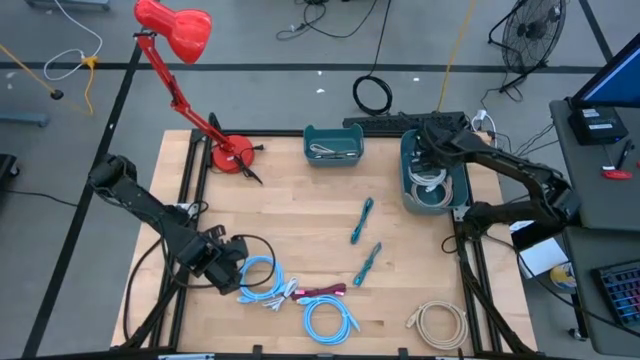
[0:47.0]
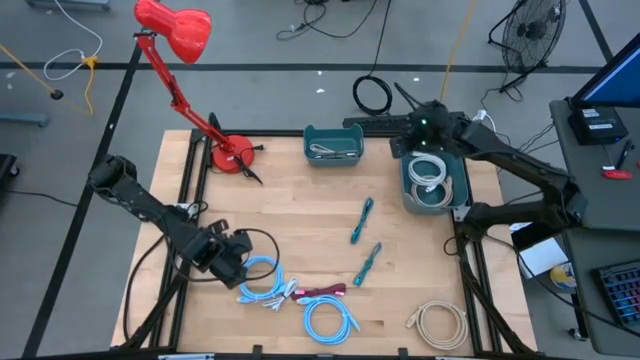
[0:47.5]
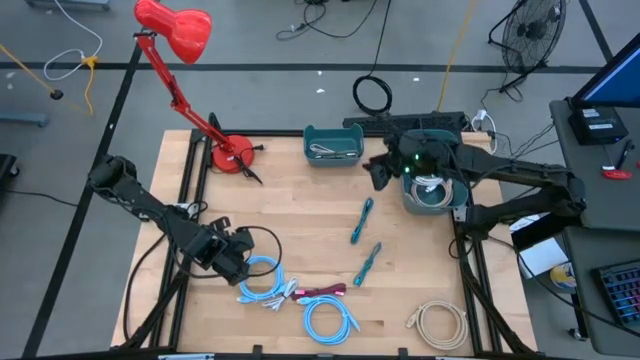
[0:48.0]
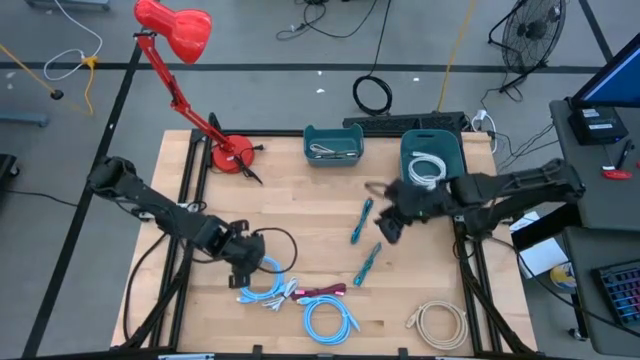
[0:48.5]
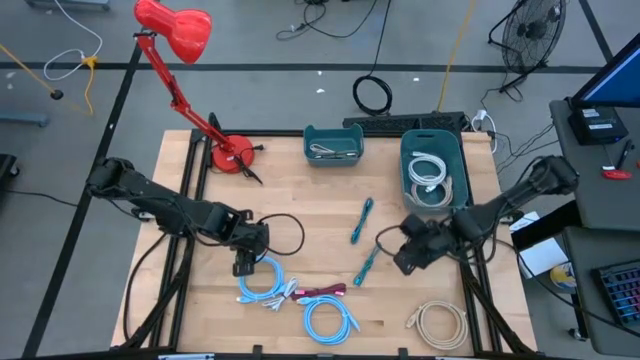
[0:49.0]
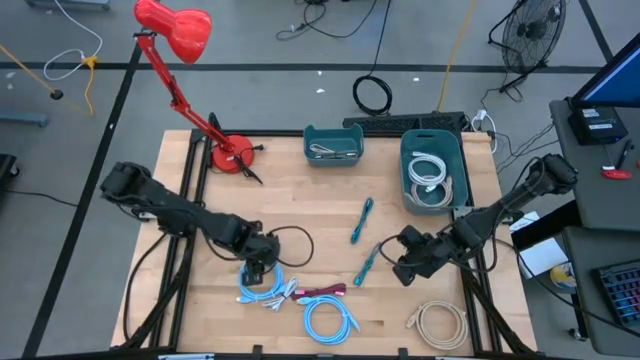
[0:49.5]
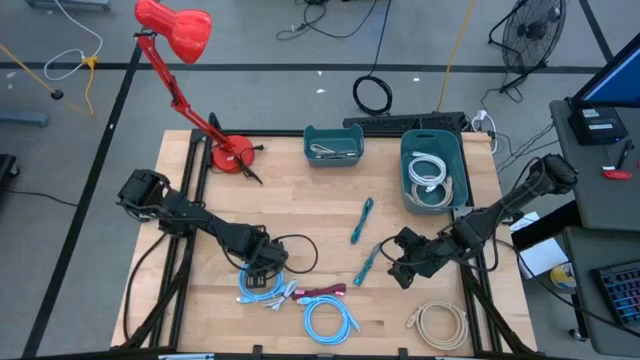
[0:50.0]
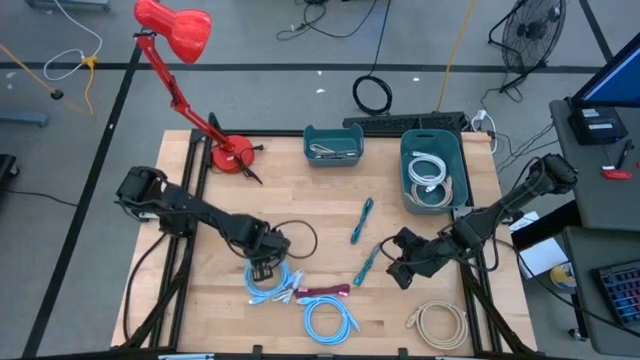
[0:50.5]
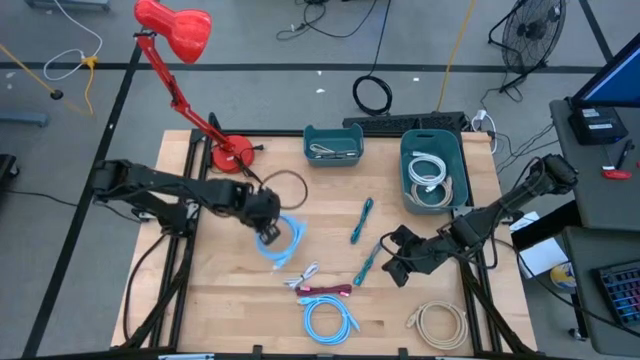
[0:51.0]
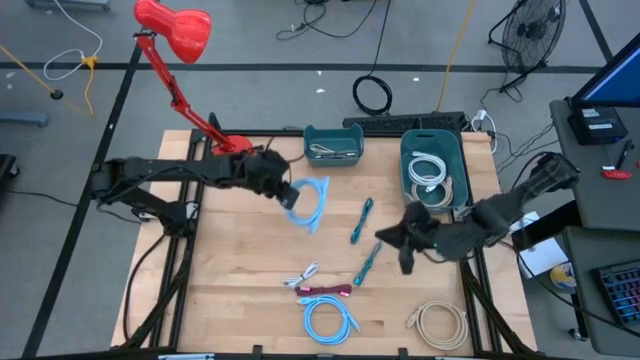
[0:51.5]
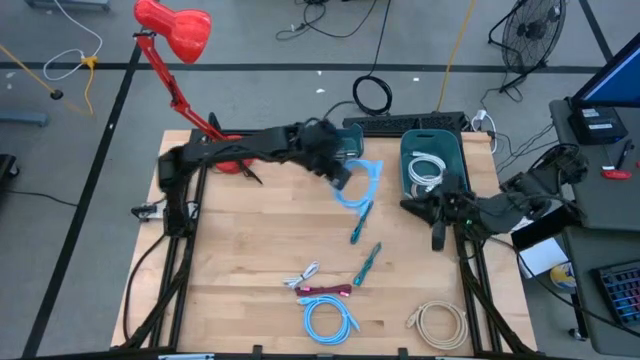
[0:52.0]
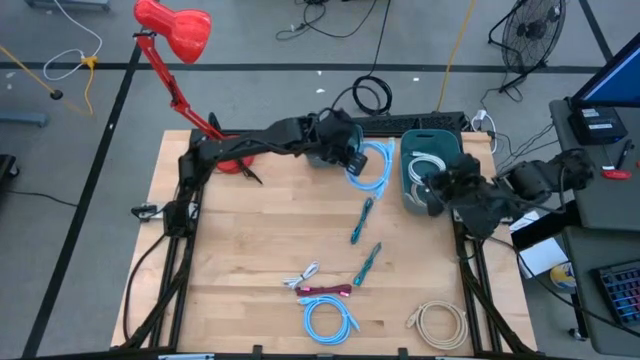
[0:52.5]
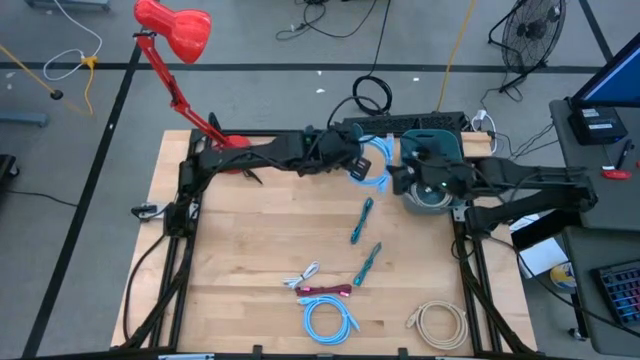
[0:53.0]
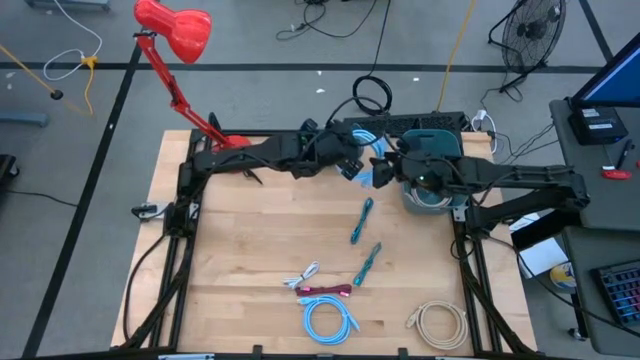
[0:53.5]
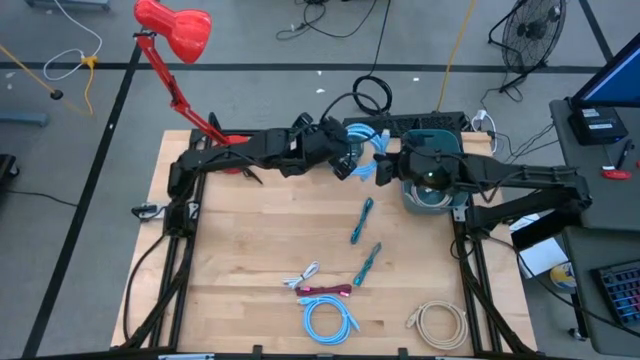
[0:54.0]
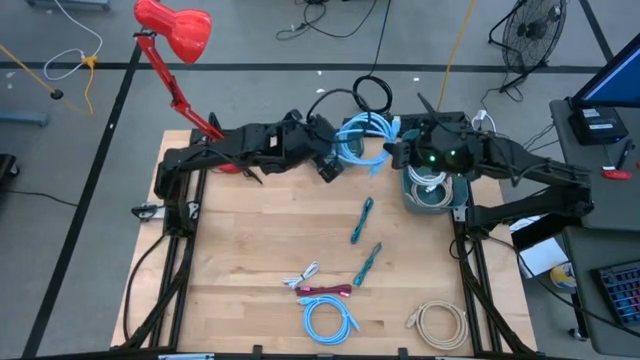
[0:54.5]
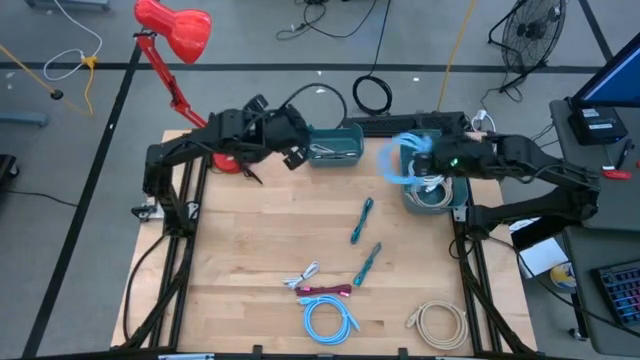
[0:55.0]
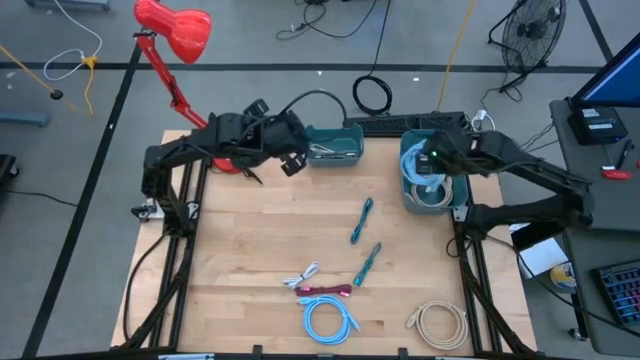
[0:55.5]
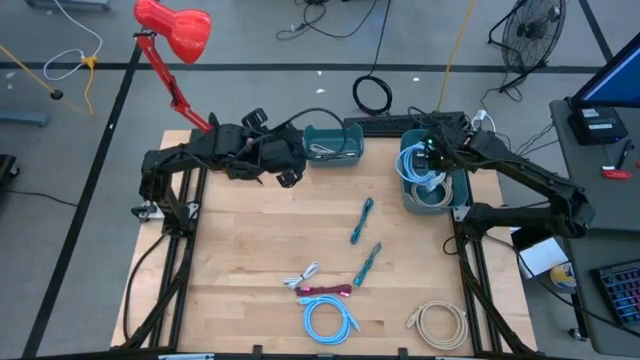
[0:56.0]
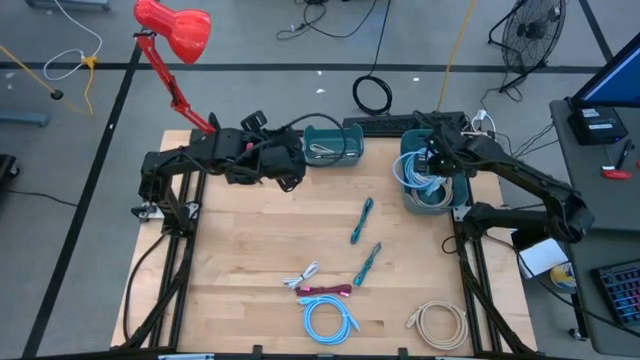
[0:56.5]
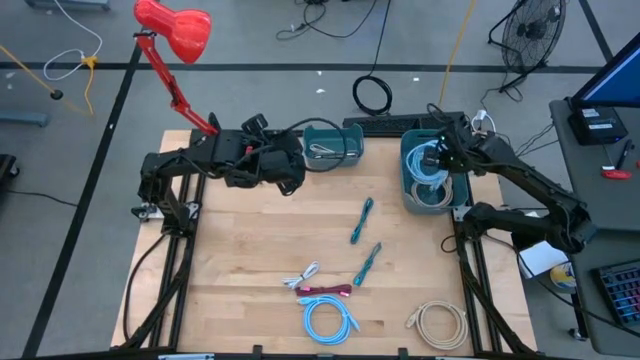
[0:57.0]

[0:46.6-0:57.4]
Task: Pick & Place USB Port
Put the left blue HDMI cable into the right blue bin

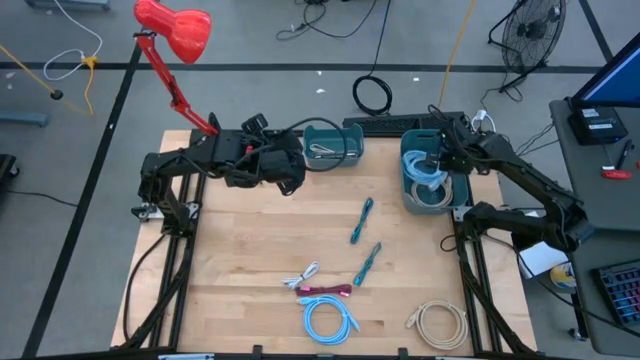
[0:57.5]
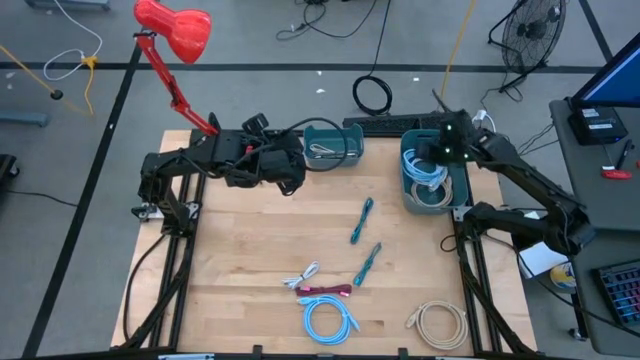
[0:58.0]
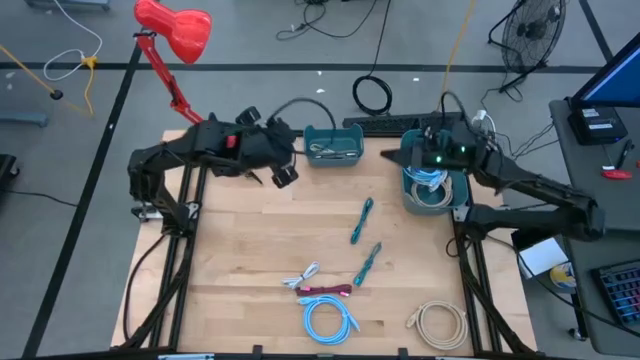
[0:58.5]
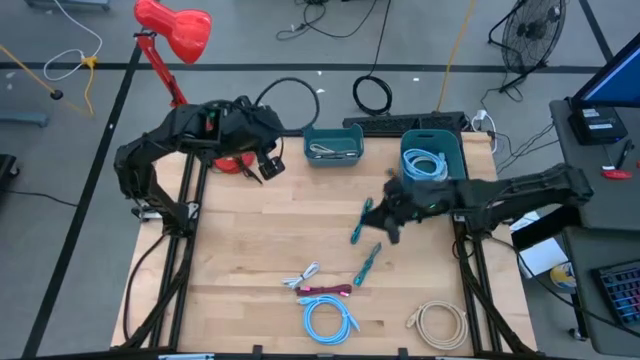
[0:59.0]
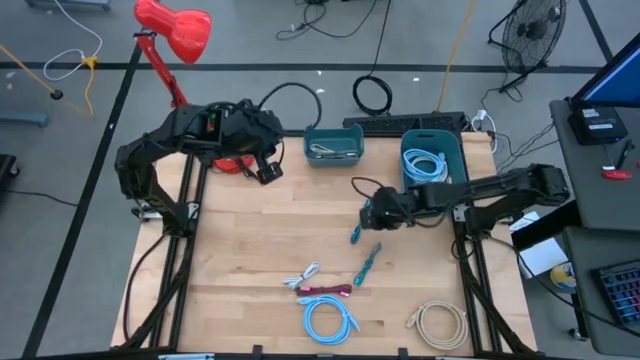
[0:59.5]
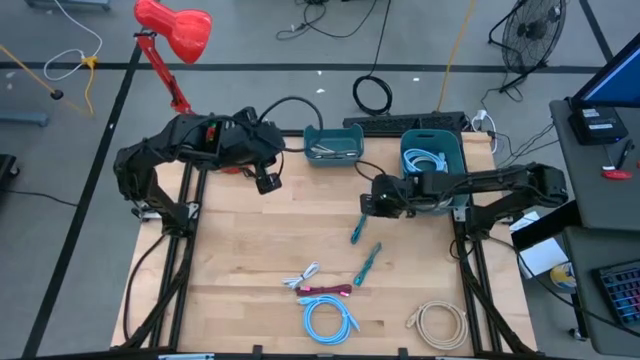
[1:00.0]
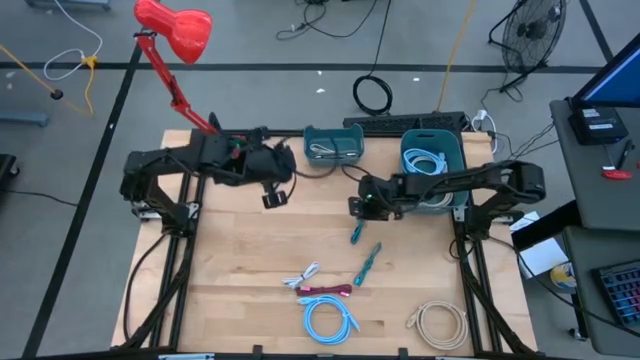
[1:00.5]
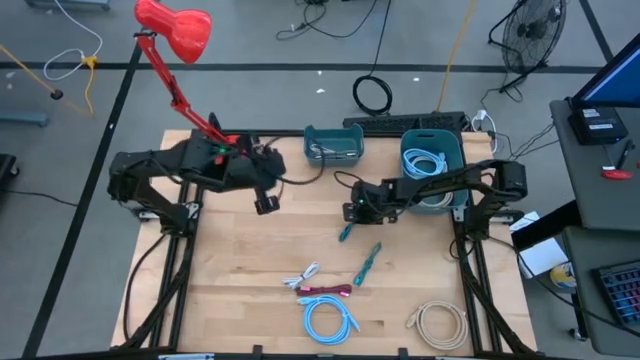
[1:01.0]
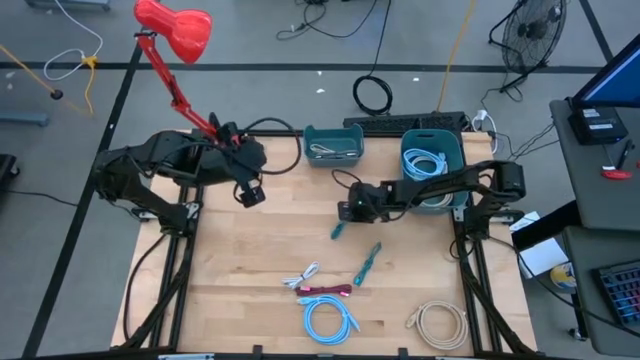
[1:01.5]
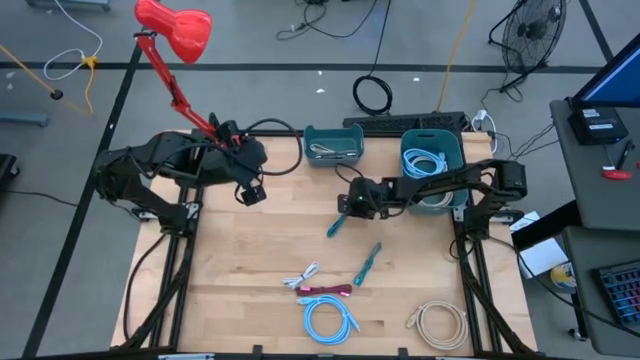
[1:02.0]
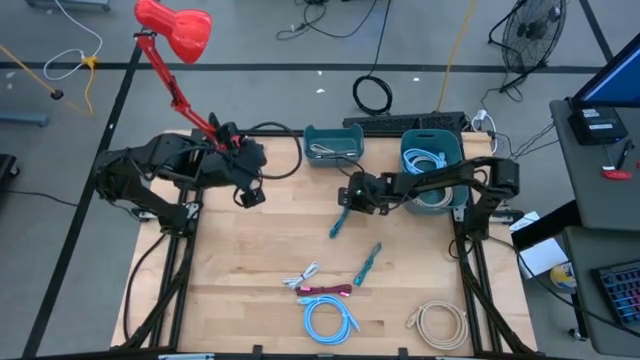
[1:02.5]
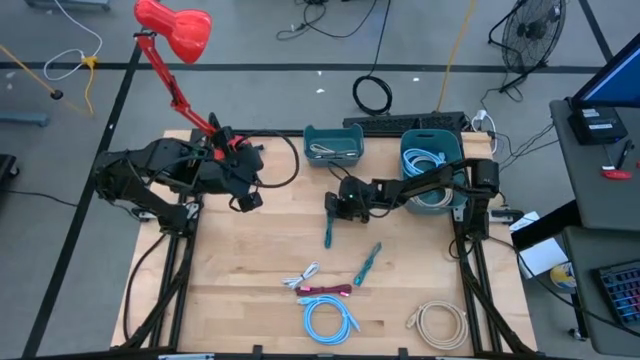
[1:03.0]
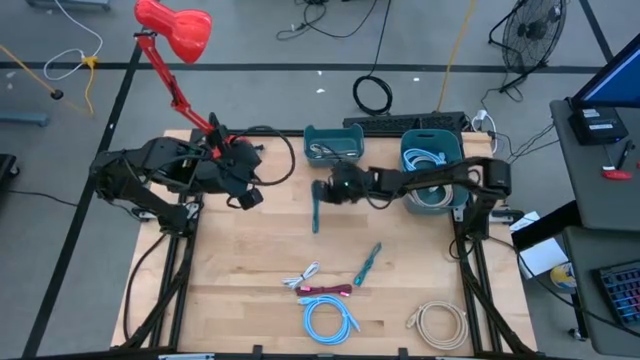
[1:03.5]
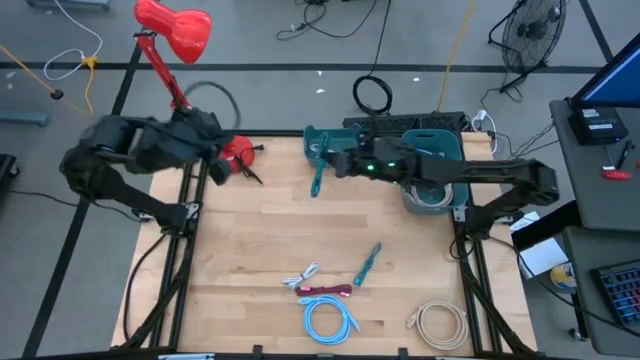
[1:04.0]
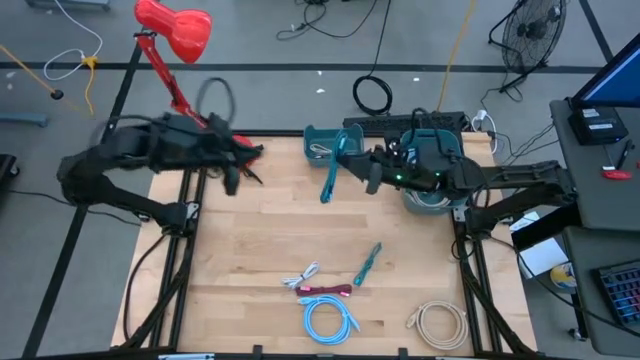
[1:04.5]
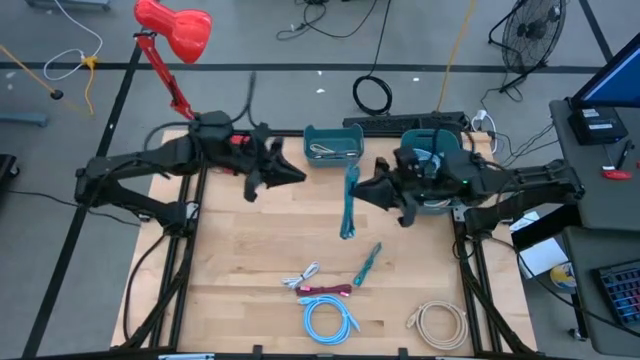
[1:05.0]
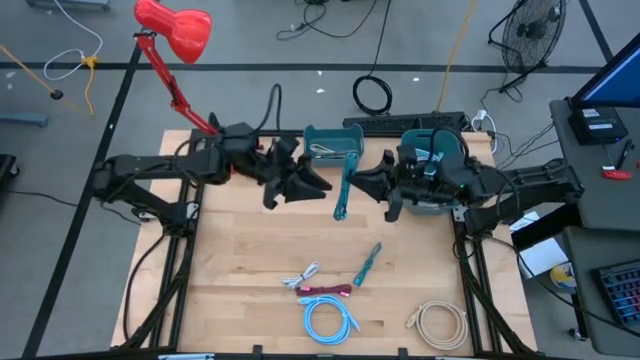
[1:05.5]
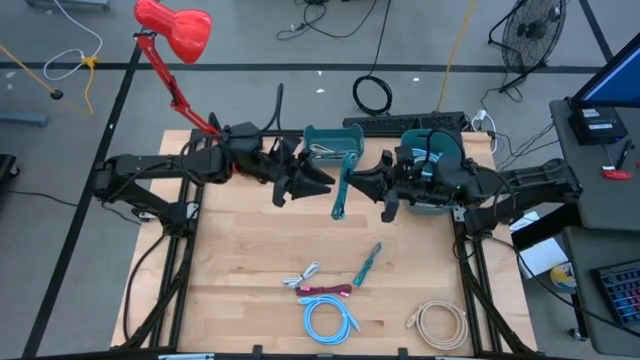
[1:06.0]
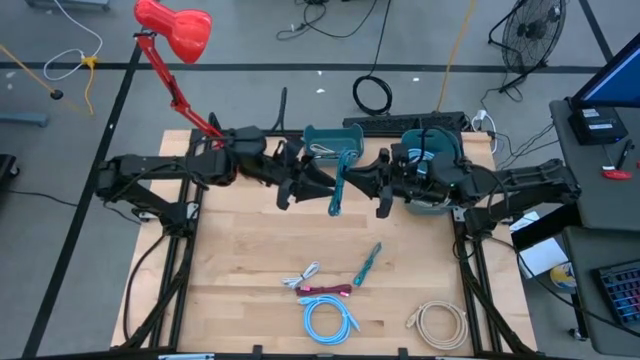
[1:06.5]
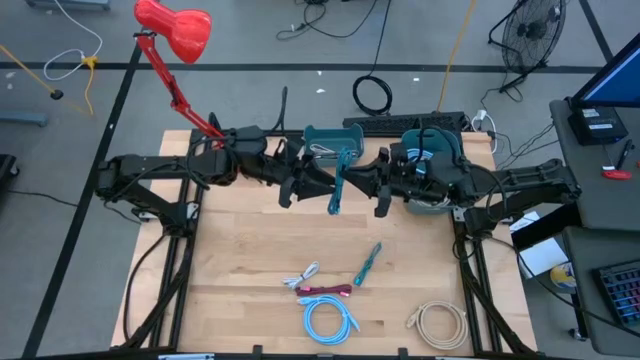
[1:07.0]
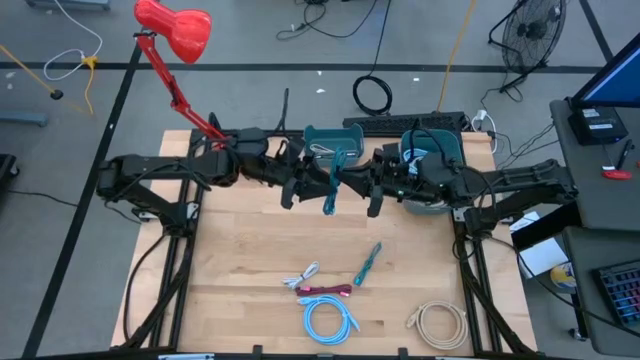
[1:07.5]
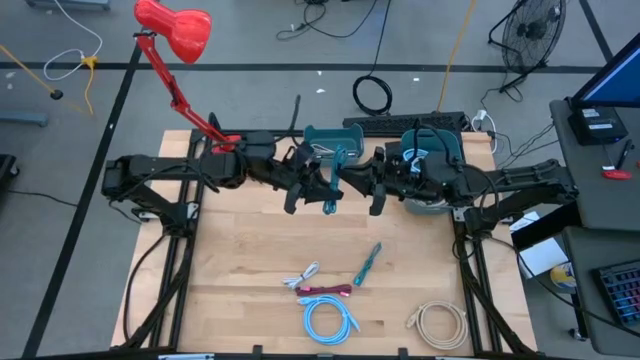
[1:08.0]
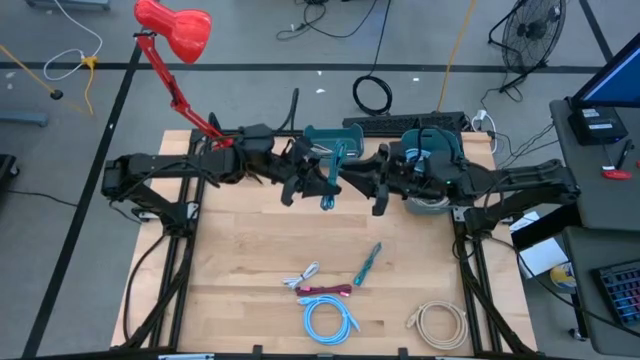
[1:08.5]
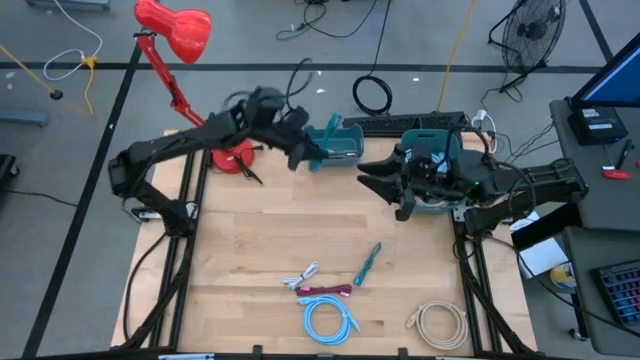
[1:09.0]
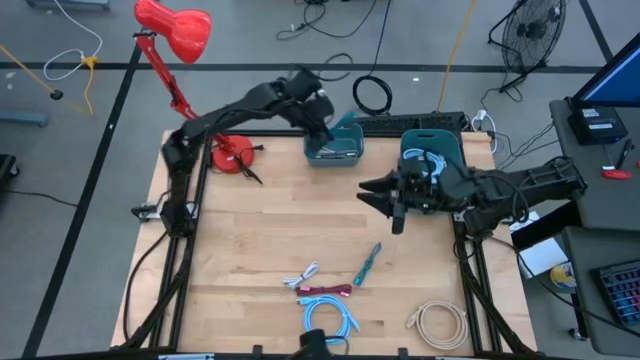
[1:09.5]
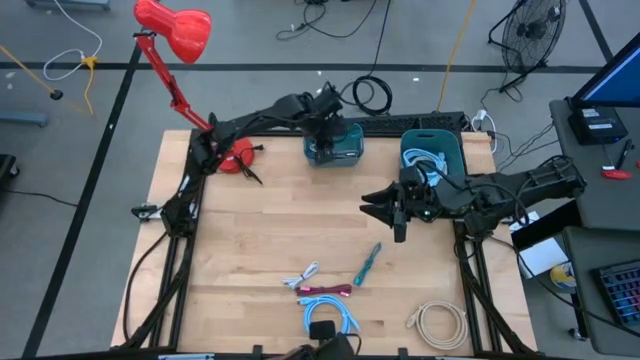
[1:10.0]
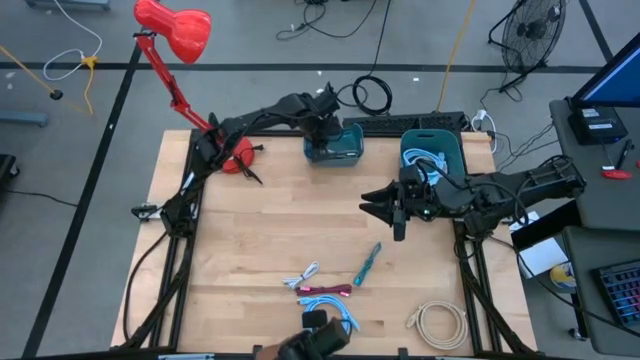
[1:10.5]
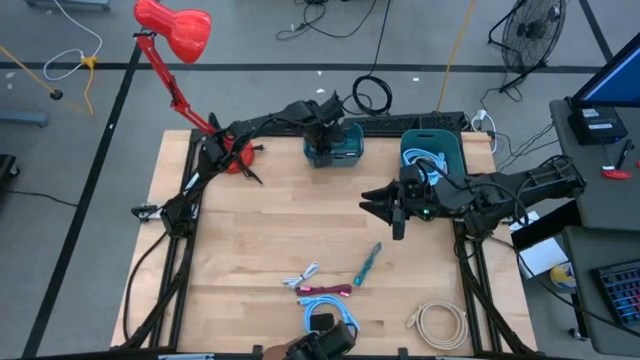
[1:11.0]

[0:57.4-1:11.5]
Put the top blue charger cable into the left blue bin
